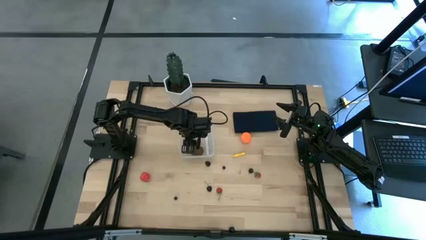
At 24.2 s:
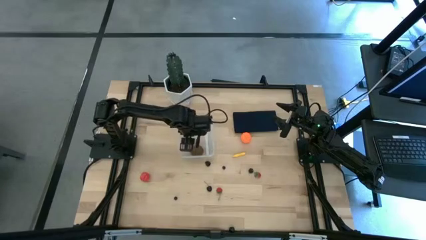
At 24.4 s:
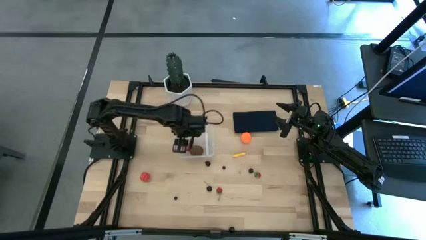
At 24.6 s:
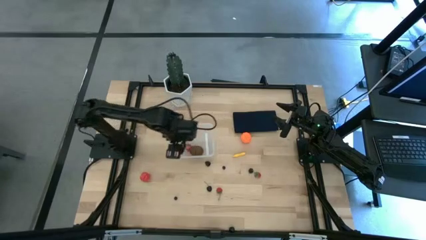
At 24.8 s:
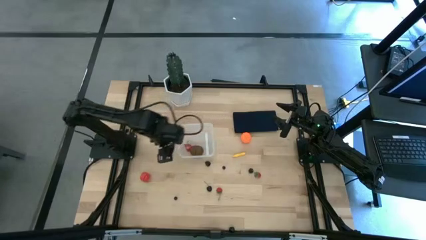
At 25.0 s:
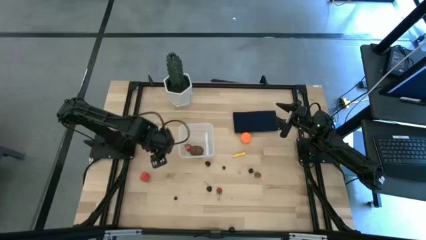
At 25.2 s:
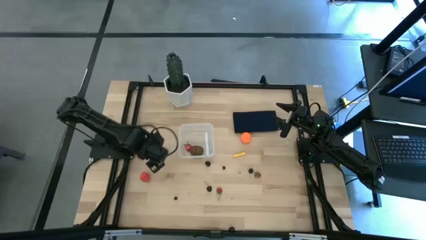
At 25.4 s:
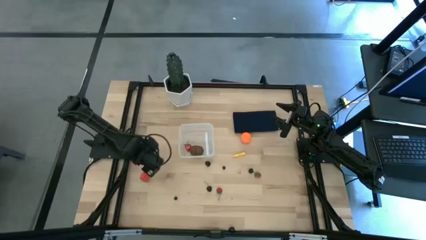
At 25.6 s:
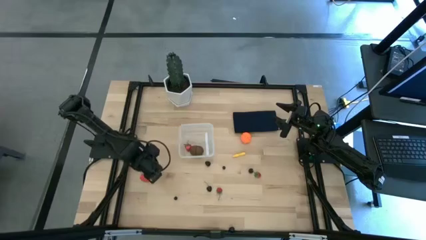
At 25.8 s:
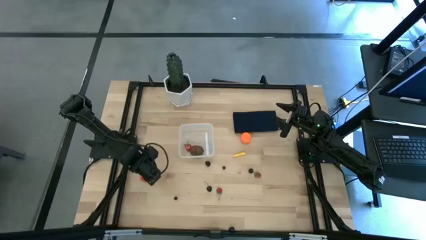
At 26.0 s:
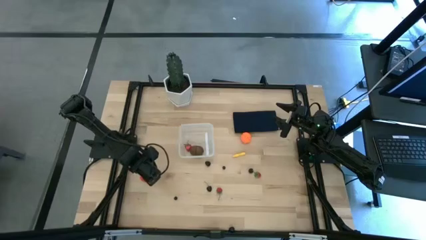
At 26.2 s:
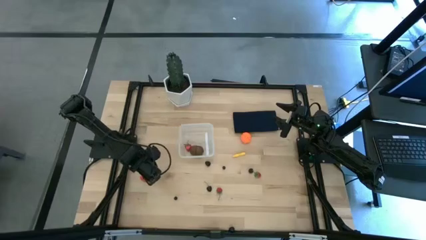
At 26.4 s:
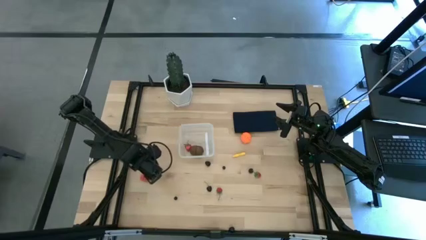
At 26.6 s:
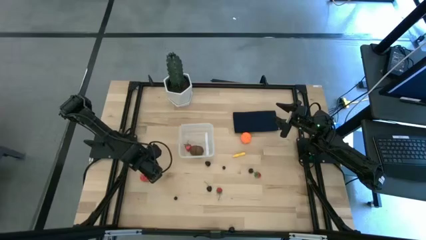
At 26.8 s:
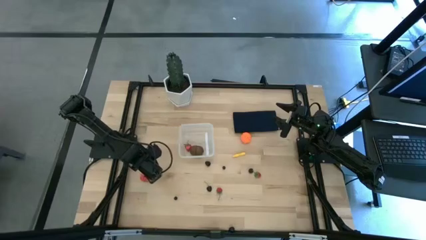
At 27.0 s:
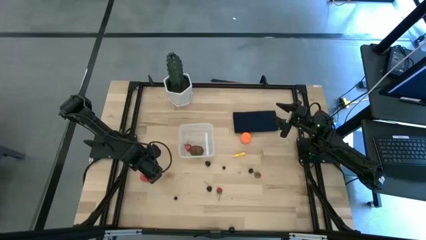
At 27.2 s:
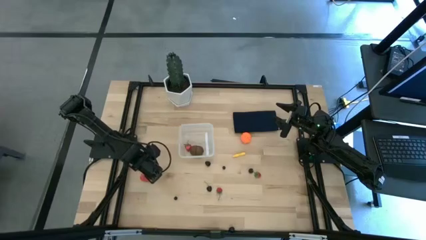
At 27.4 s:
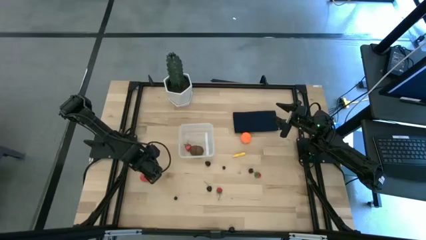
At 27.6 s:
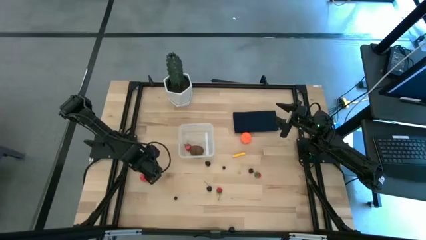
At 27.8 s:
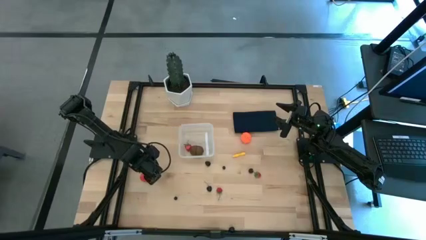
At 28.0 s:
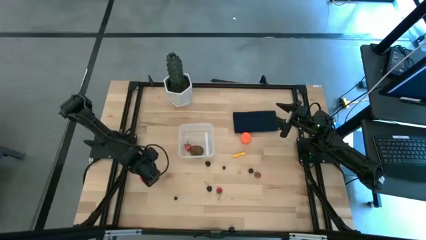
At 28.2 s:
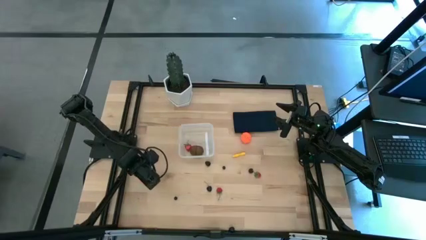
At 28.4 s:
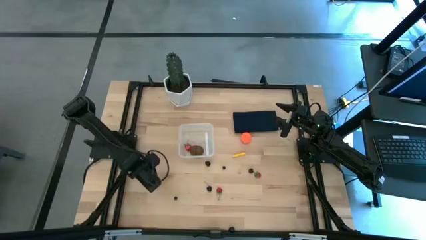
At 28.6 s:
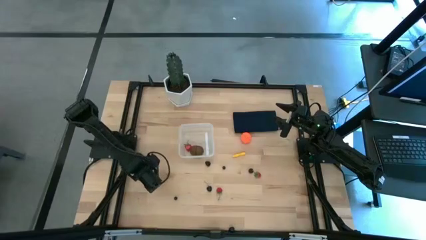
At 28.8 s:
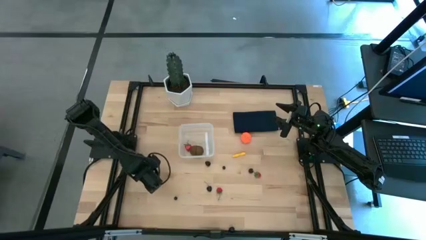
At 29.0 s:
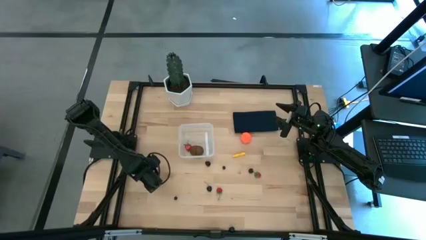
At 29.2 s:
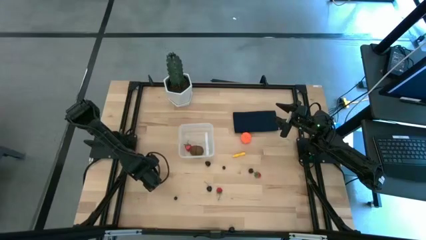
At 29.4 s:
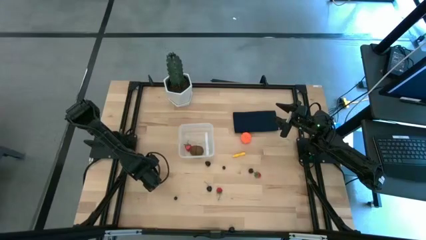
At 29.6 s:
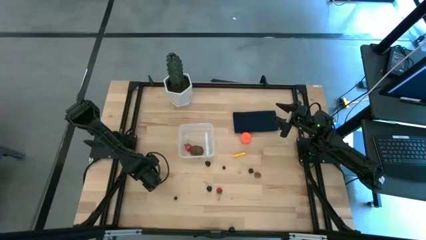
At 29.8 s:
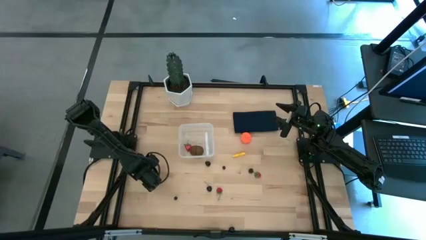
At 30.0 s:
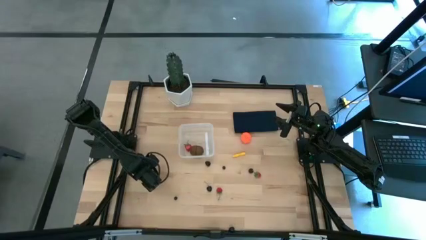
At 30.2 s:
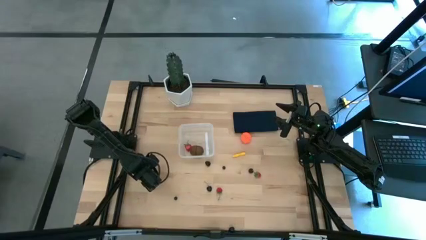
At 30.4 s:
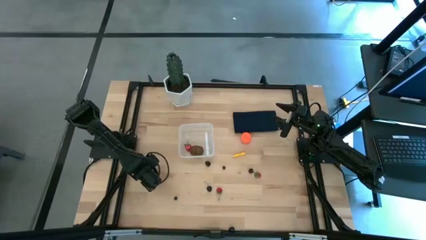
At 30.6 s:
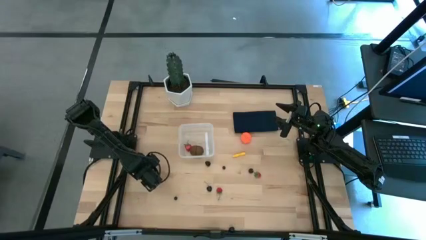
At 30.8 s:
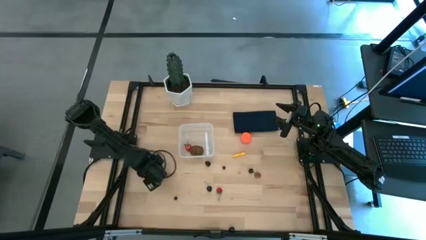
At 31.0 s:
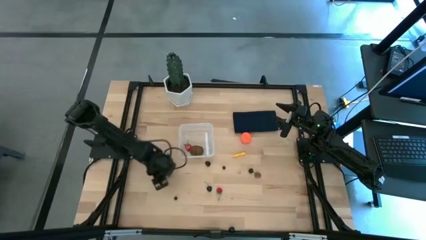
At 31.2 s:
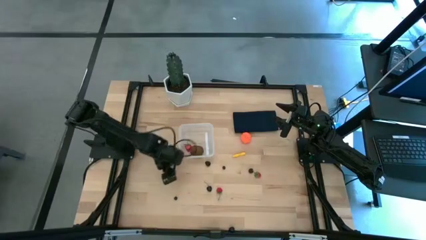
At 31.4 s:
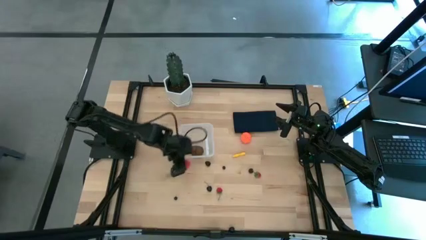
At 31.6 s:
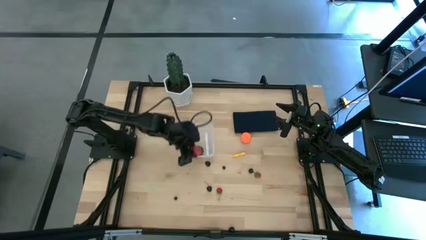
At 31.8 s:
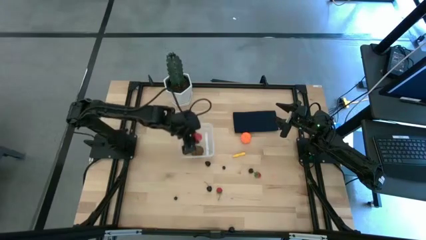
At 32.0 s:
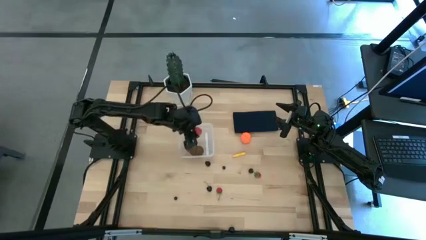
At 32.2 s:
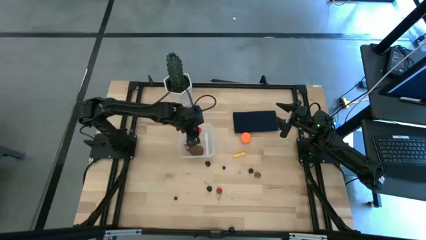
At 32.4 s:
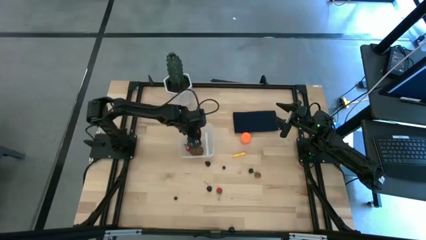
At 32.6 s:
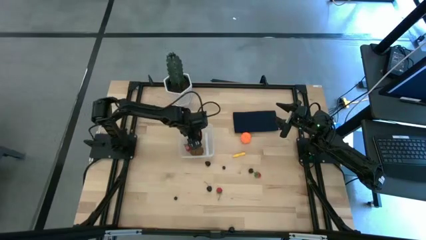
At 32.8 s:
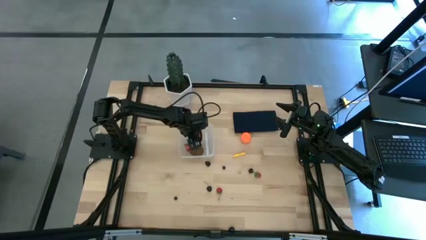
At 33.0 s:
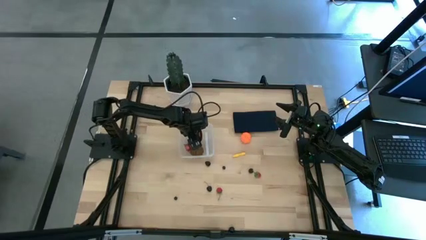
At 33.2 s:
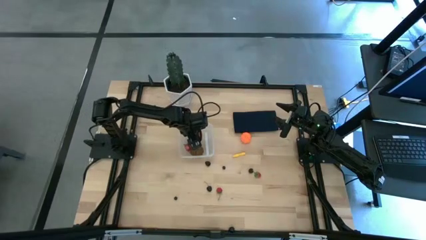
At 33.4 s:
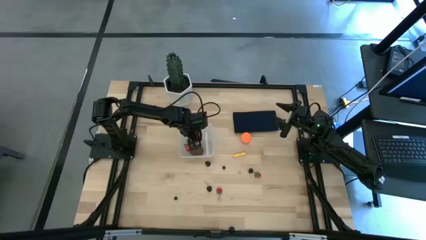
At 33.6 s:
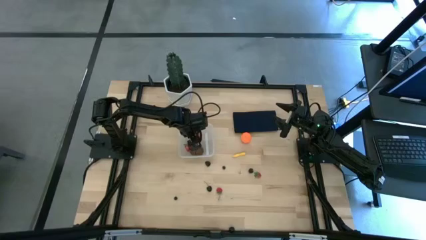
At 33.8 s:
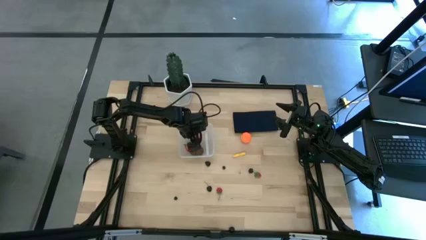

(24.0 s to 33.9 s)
Task: Pick and placing Produce into tupperware
Put the orange cherry into the transparent container

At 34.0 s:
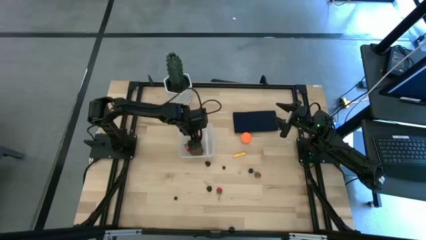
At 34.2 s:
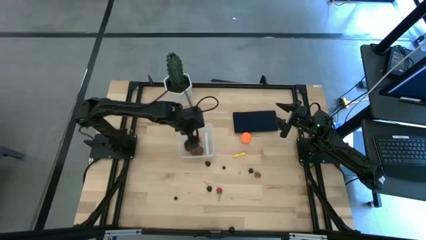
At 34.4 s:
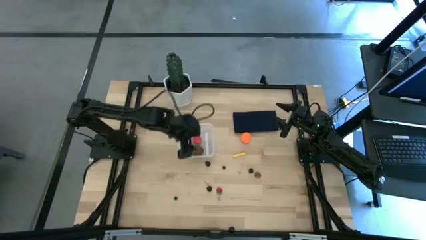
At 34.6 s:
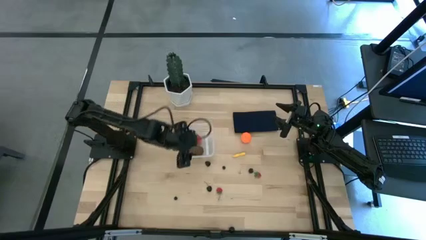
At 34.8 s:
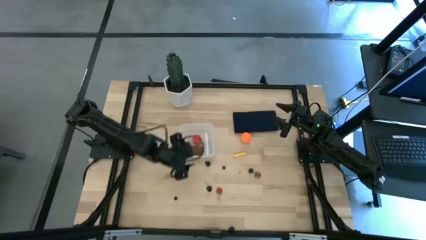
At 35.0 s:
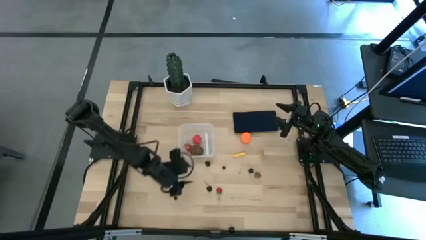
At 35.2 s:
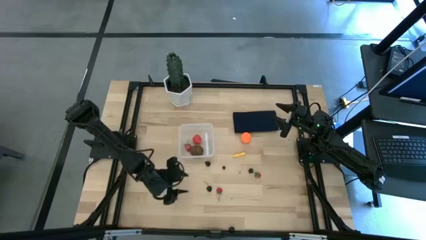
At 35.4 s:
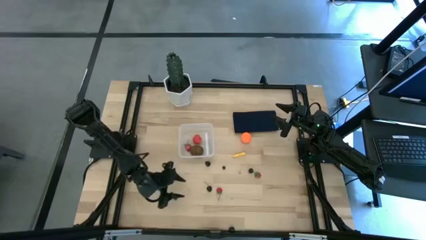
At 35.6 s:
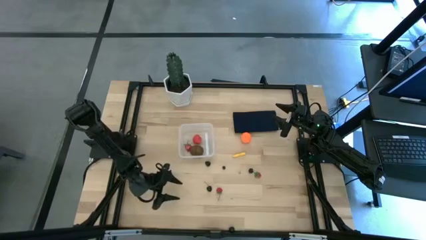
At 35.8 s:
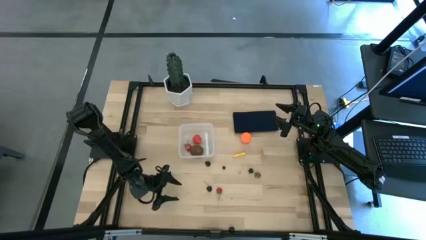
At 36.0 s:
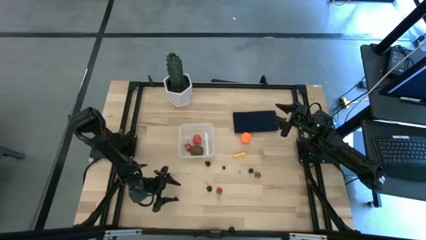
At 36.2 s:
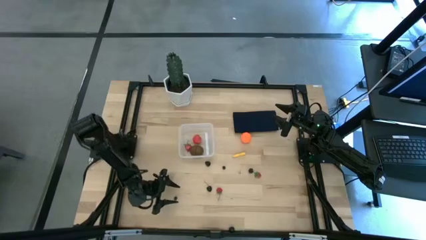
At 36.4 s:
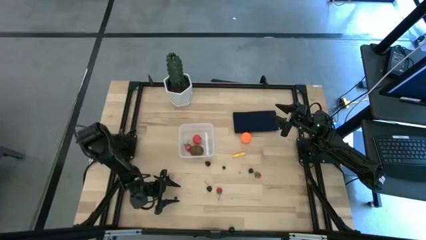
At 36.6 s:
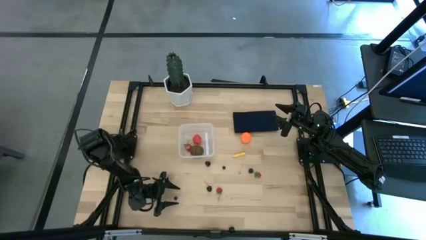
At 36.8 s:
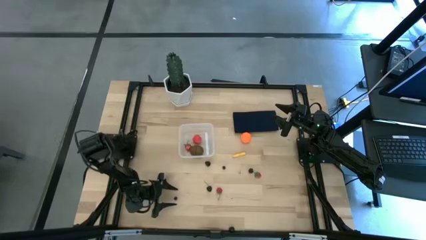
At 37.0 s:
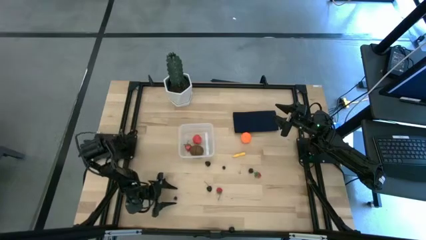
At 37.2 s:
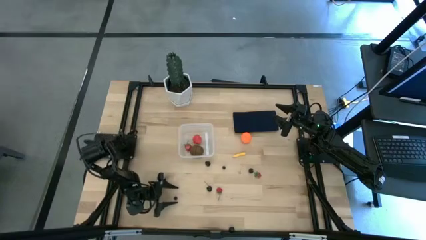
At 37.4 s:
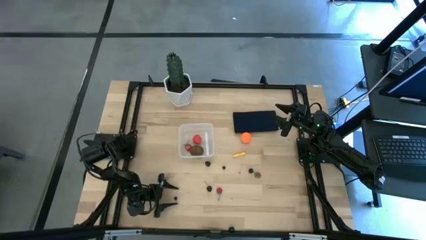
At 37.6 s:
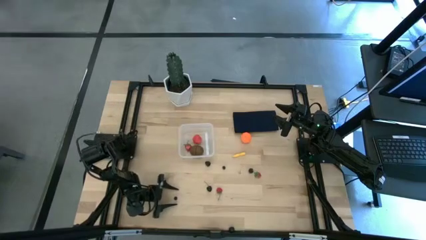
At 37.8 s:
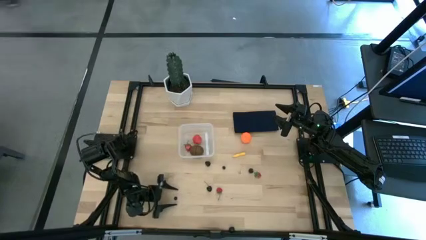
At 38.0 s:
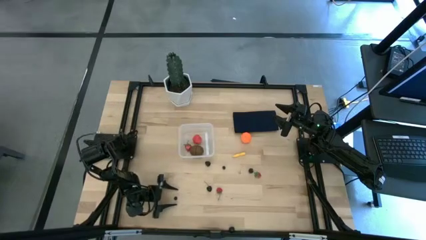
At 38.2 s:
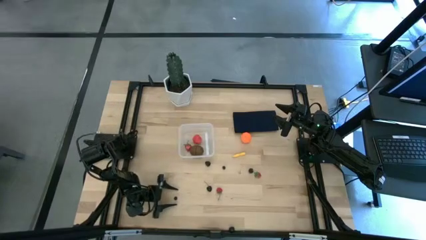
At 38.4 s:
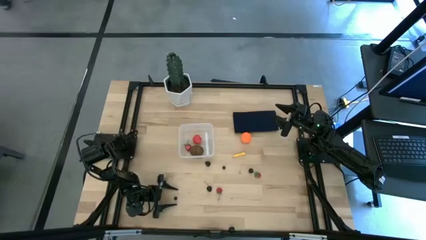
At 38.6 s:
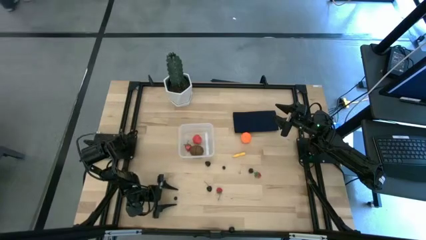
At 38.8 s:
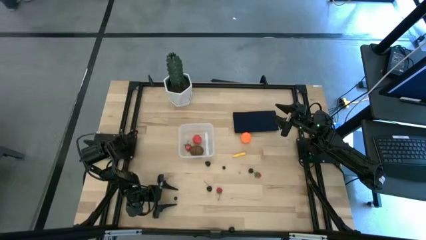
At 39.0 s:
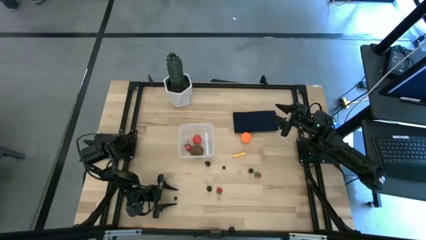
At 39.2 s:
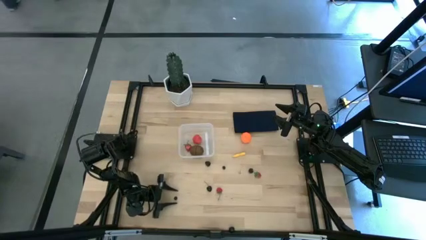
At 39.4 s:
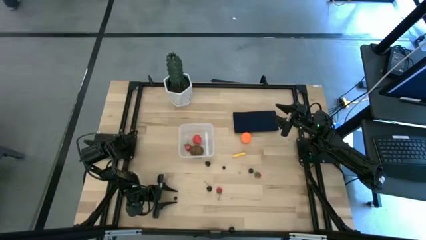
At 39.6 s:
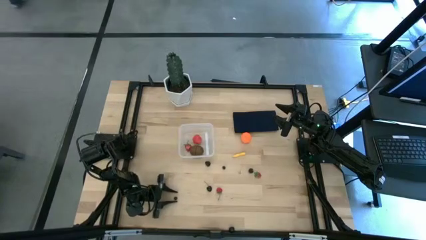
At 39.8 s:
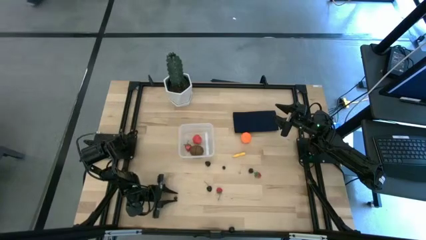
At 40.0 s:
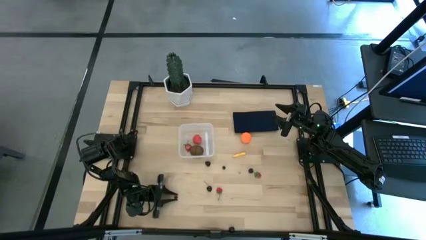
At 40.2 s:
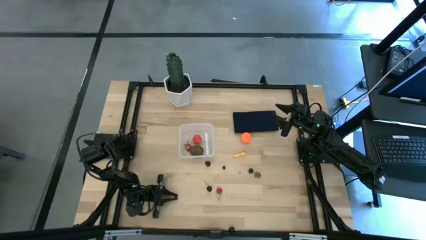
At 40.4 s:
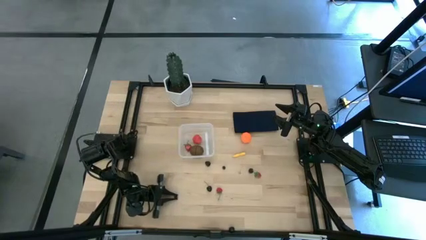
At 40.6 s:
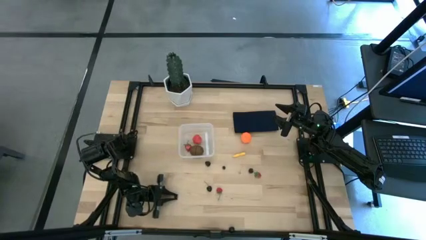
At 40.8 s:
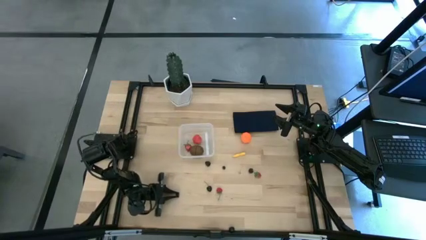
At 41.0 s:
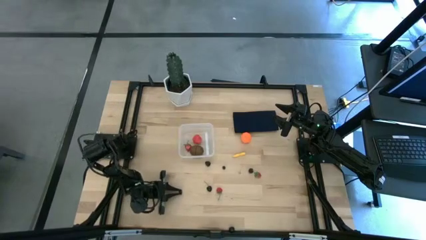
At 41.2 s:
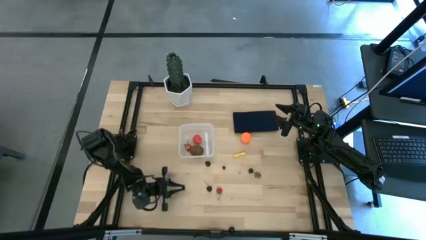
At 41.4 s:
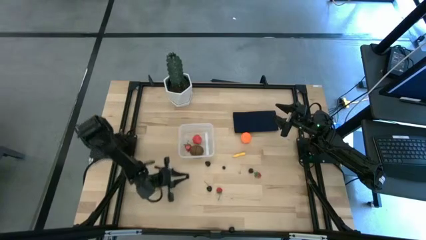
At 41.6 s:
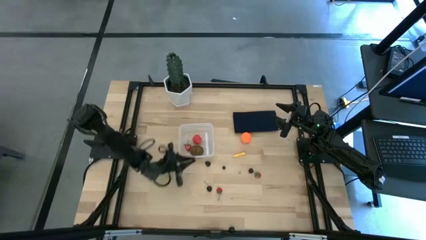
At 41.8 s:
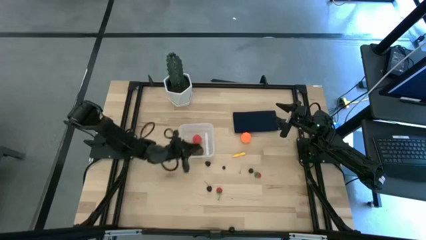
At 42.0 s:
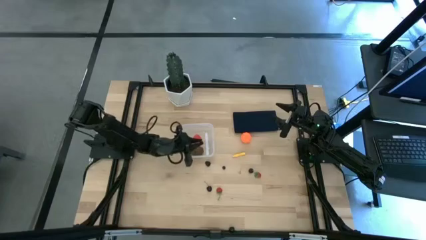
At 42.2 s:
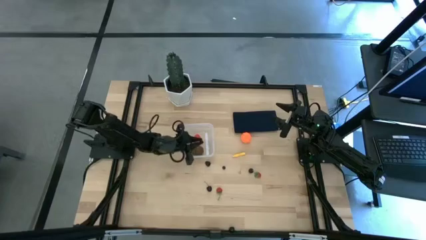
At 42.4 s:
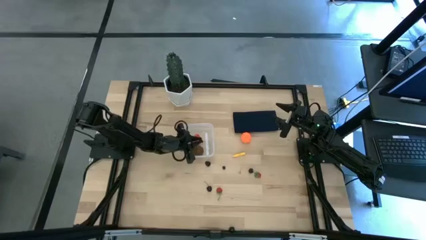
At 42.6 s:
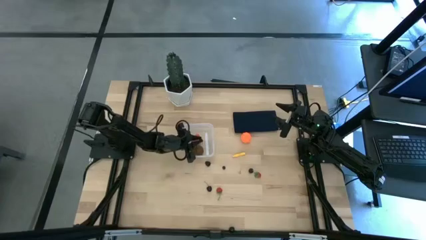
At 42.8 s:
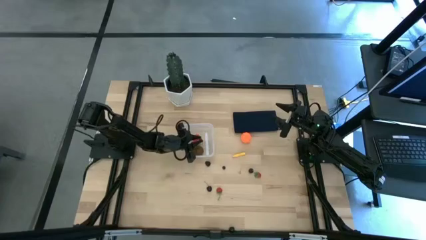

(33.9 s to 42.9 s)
Put the bottom blueberry into the transparent container
